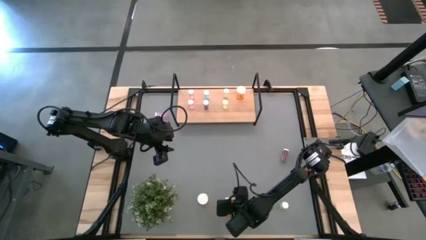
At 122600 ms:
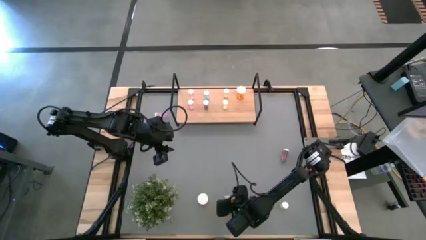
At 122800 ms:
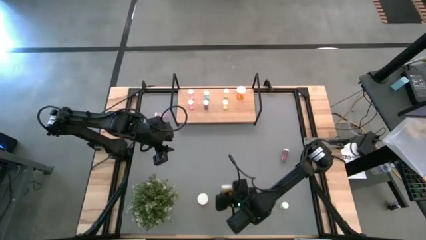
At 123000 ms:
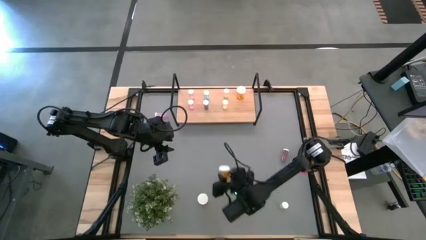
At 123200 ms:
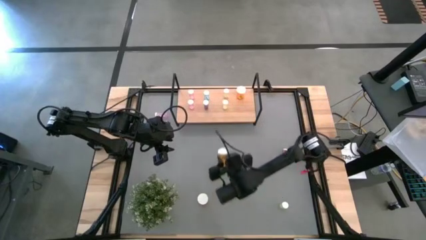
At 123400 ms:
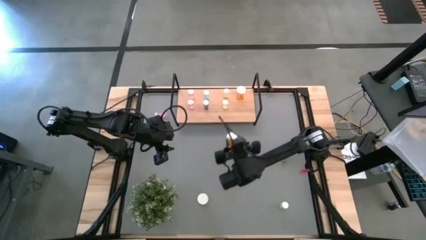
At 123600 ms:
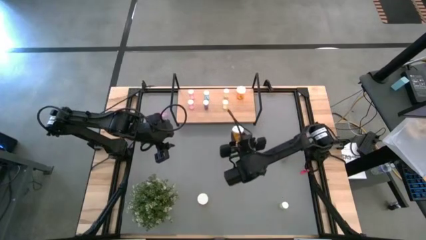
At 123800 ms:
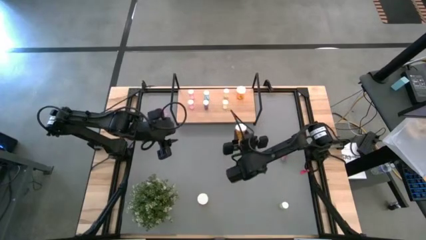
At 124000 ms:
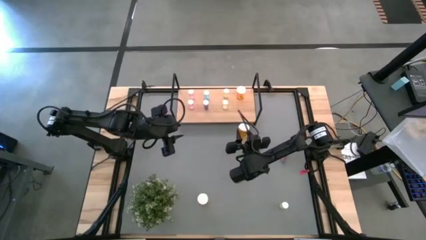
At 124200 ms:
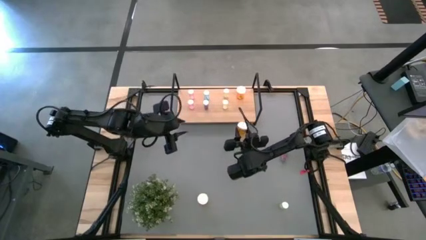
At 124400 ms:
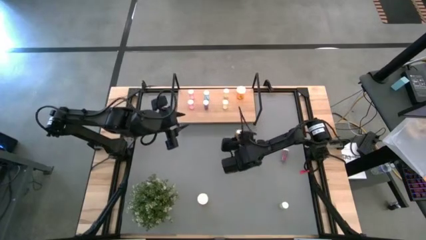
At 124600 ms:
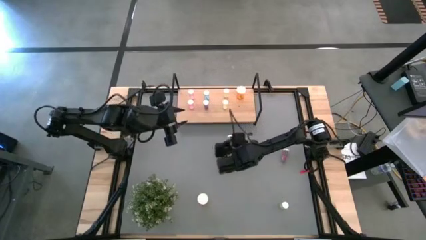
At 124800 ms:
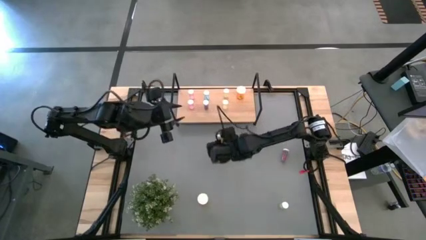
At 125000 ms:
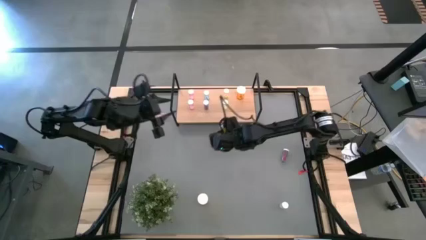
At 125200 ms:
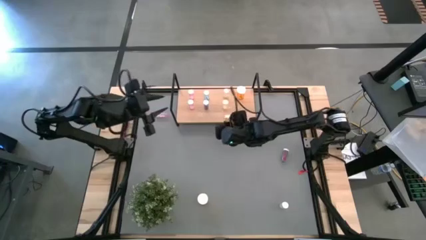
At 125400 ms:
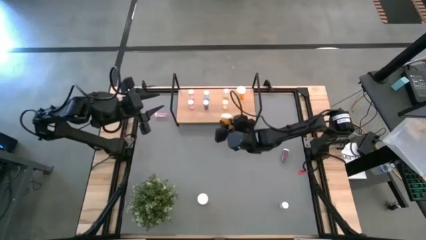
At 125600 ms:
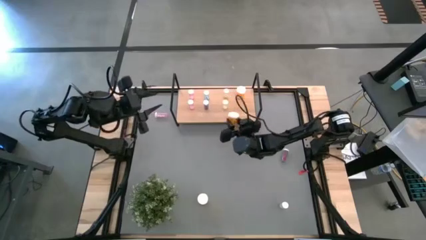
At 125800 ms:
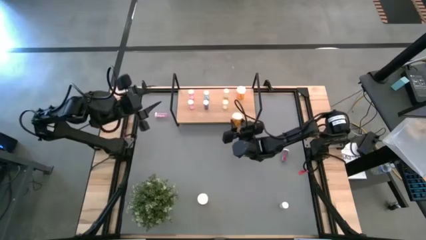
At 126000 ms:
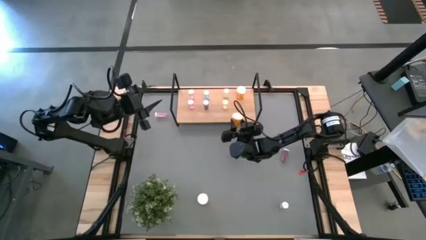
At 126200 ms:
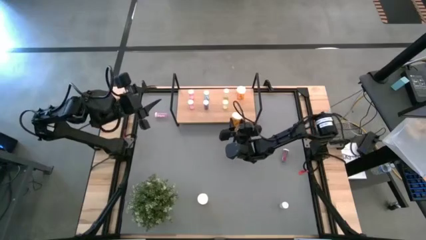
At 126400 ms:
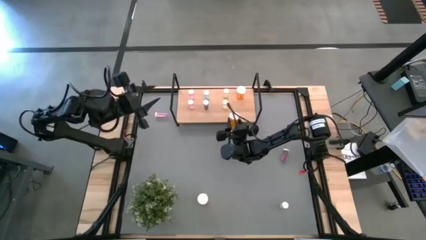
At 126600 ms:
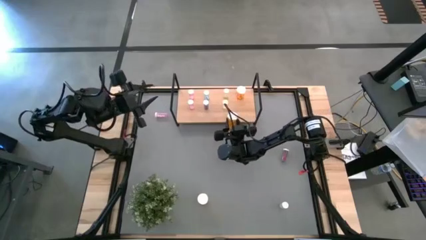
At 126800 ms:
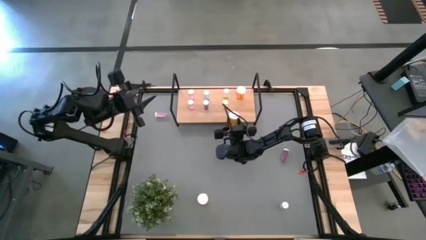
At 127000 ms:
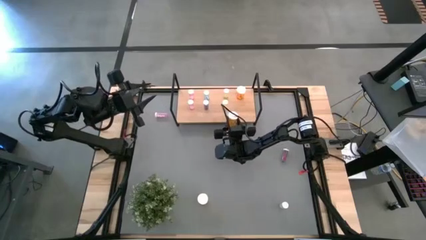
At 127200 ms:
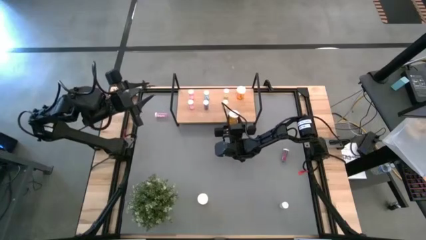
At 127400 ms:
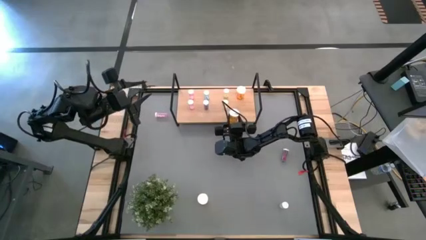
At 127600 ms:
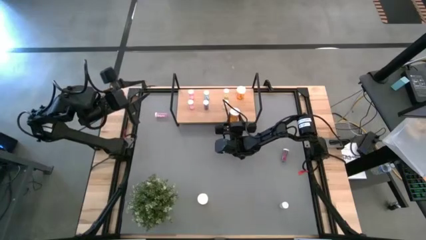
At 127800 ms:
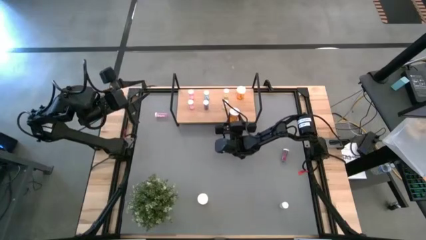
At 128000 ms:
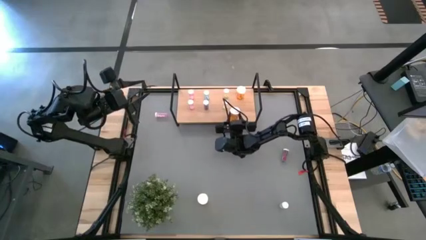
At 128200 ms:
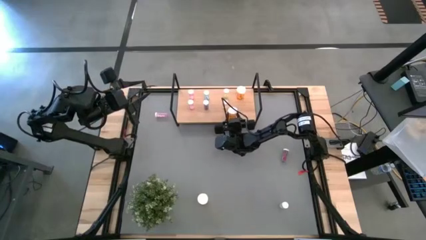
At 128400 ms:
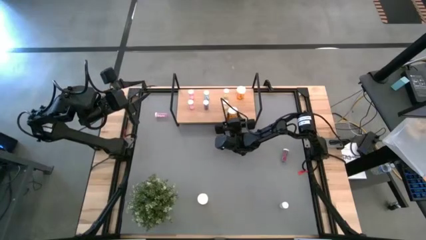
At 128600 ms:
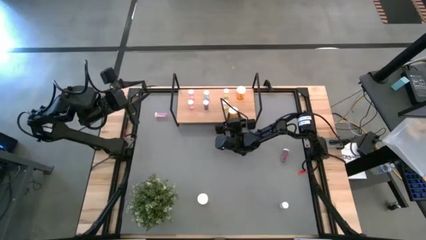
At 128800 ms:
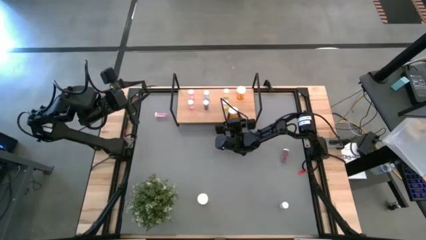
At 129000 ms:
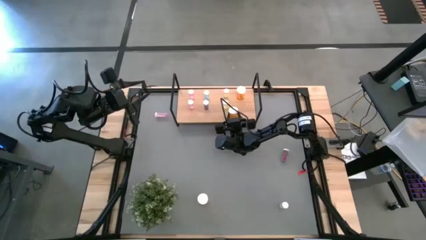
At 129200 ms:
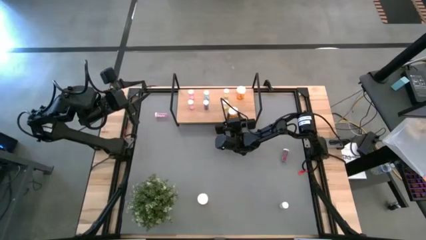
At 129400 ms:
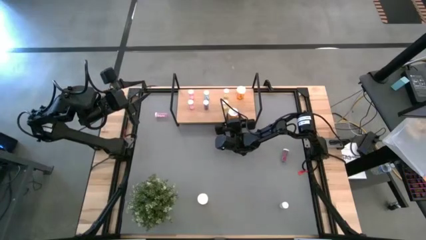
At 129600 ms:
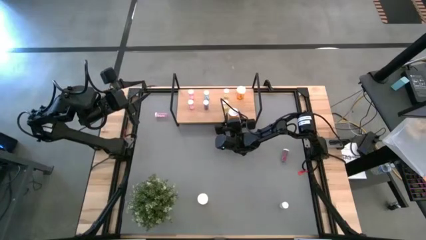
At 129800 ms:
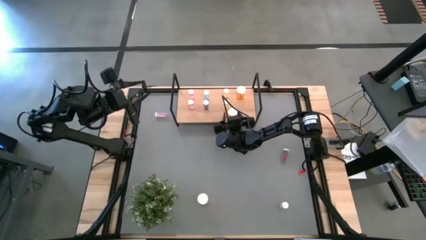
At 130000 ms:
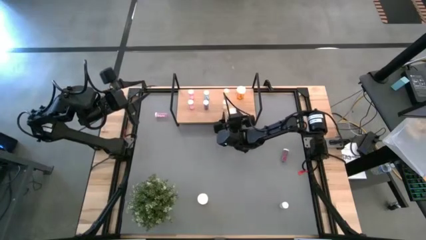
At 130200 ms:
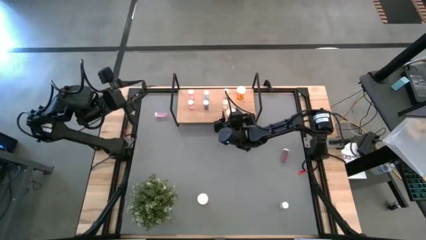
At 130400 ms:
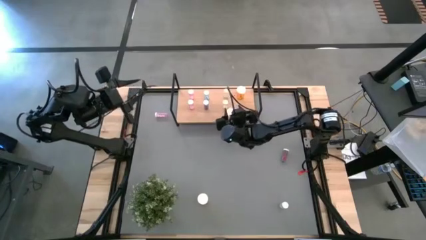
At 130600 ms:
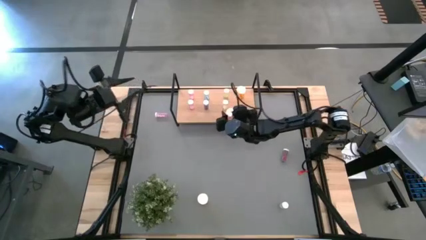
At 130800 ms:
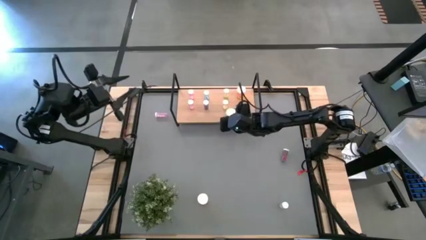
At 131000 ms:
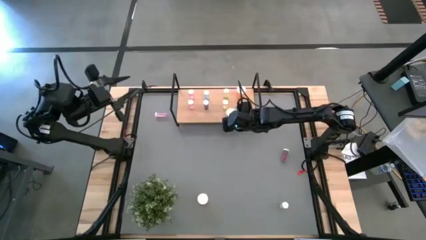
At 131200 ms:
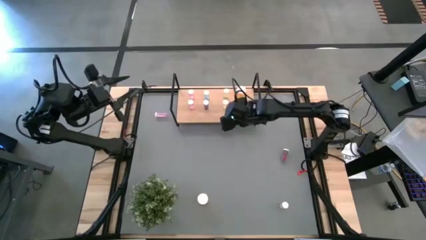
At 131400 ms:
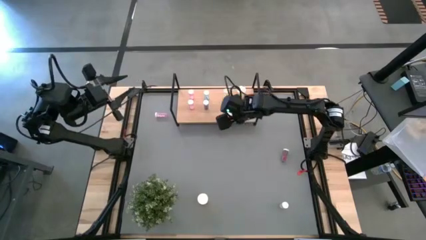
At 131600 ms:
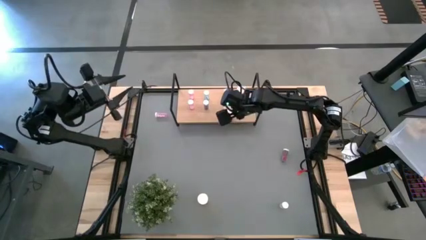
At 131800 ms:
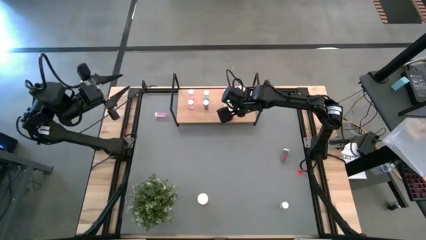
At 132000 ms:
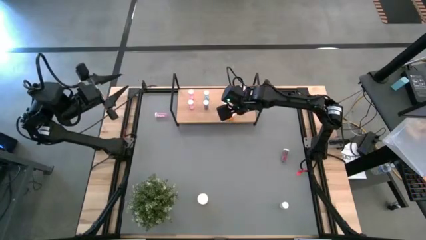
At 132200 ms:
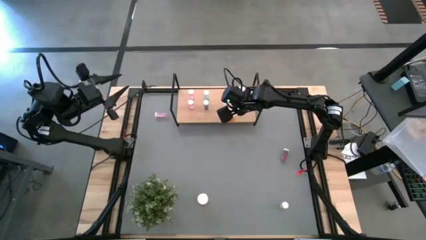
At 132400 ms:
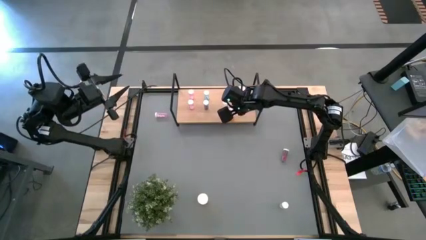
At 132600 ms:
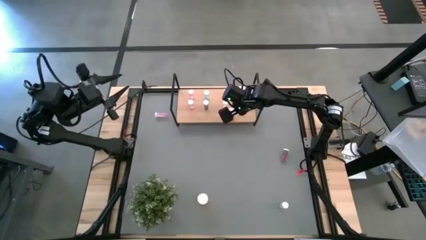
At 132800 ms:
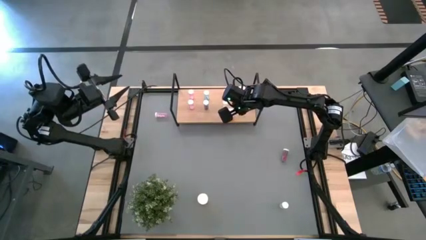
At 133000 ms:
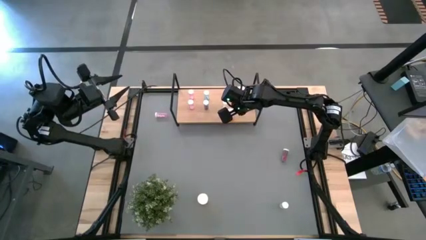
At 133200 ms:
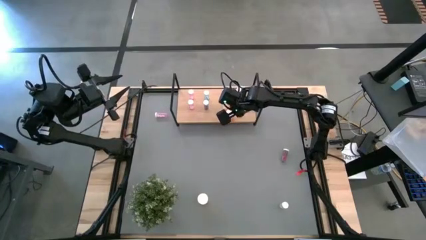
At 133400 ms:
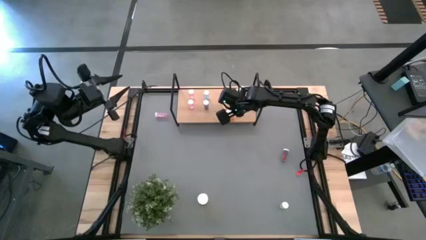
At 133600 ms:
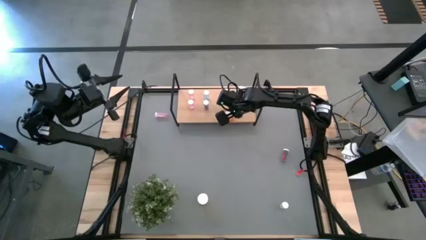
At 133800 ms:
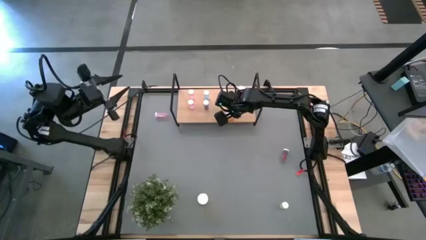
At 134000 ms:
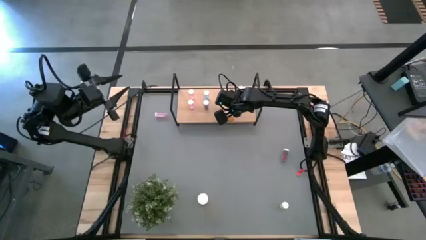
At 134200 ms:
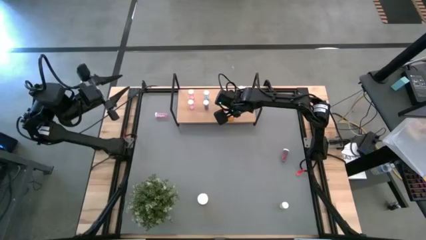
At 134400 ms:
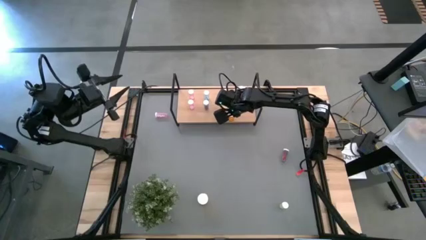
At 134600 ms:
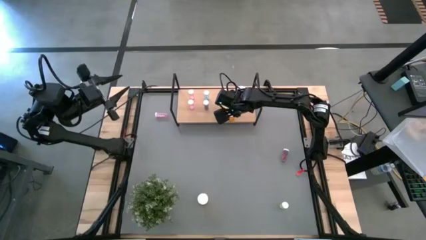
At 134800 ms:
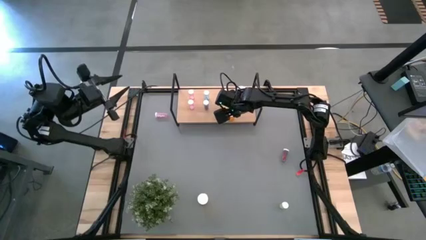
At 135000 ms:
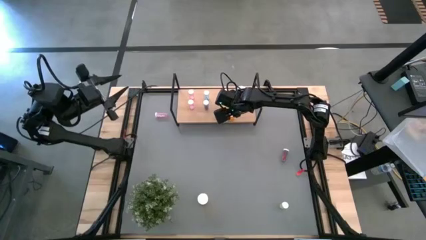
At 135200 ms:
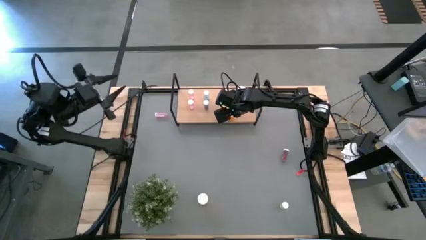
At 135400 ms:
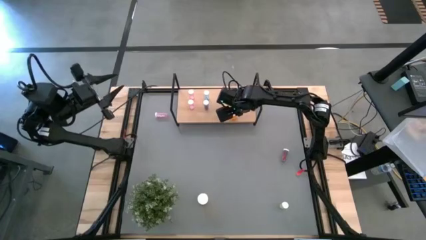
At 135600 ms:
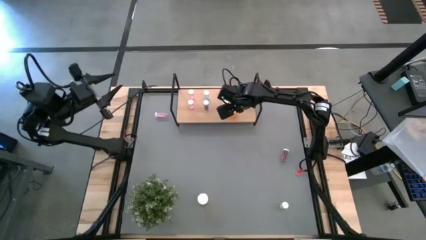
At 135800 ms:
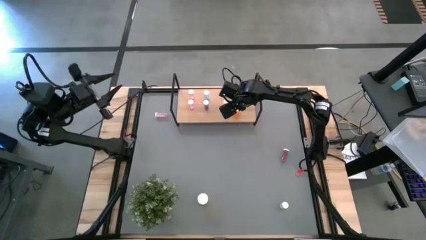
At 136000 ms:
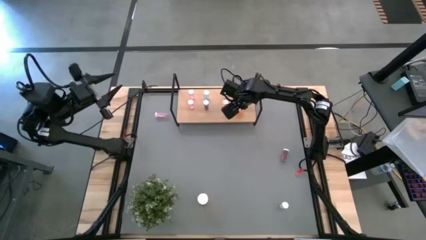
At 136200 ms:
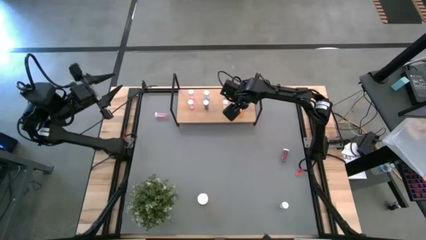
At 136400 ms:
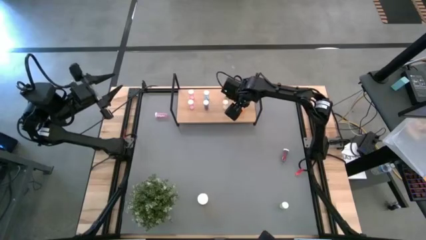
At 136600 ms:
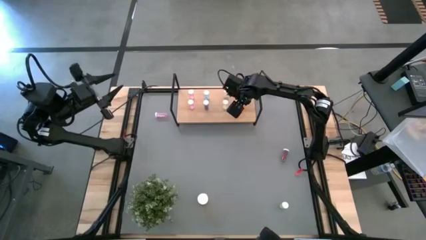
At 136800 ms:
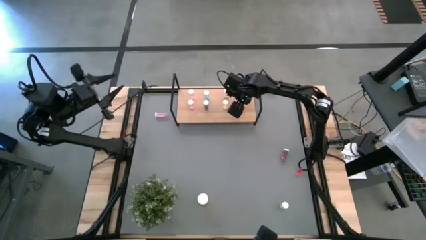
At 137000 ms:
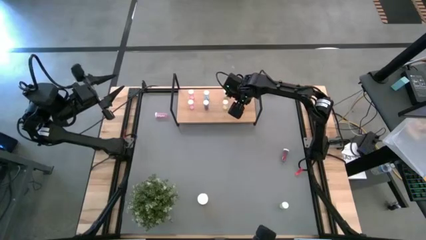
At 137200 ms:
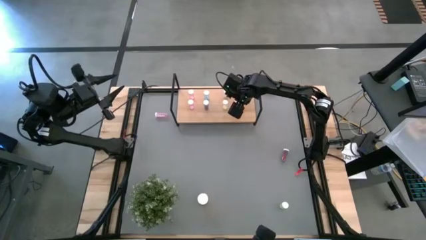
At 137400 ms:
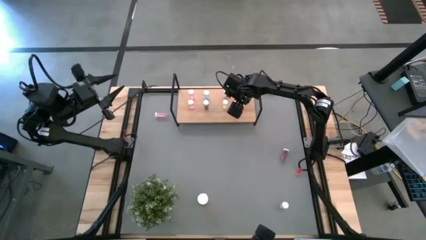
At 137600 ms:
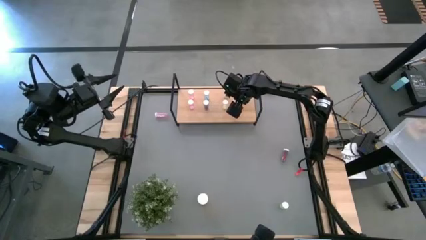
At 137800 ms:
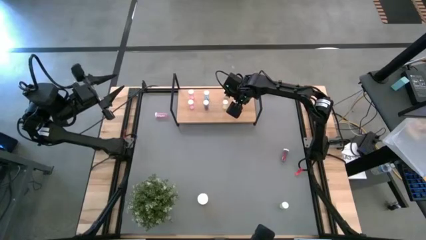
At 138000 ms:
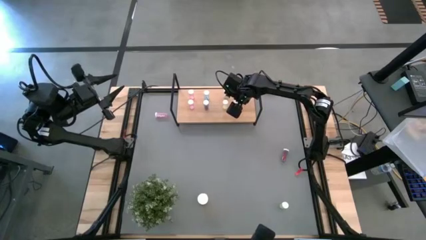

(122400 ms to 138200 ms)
Task: Pick and place medicine bottles onto shelf by color
Put the right orange pill bottle on the shelf aligned with the other orange pill bottle
